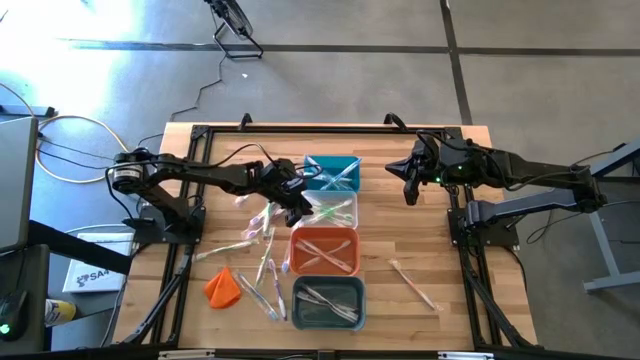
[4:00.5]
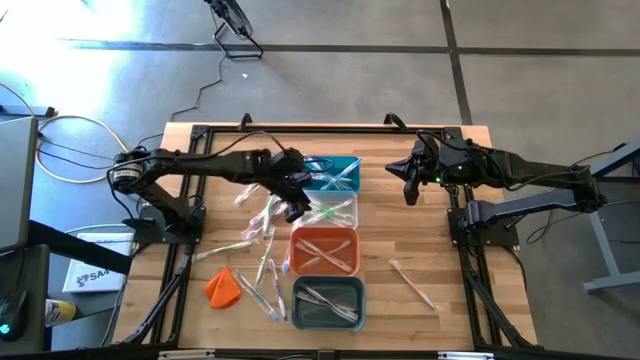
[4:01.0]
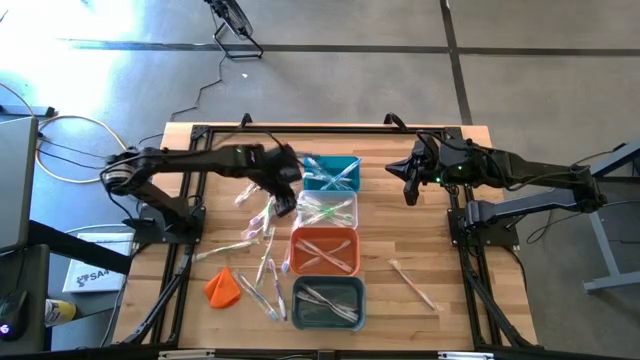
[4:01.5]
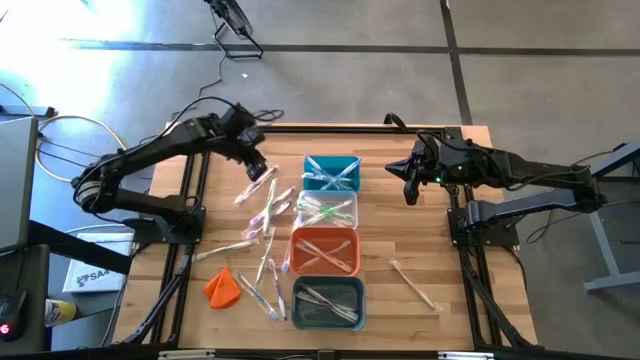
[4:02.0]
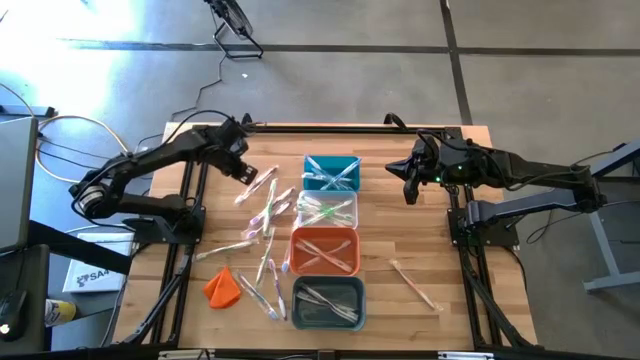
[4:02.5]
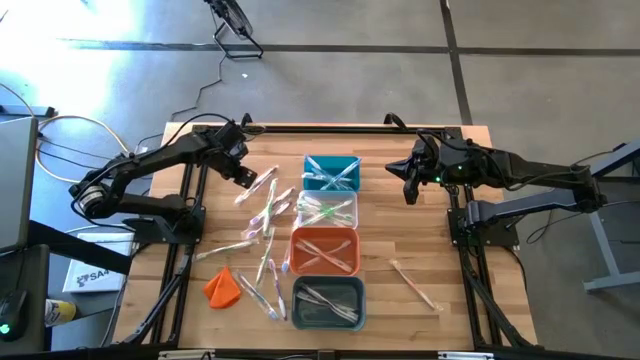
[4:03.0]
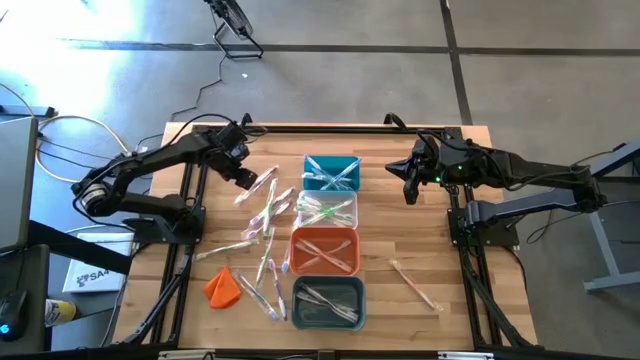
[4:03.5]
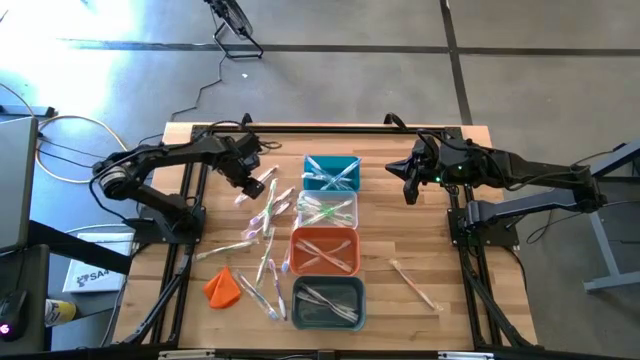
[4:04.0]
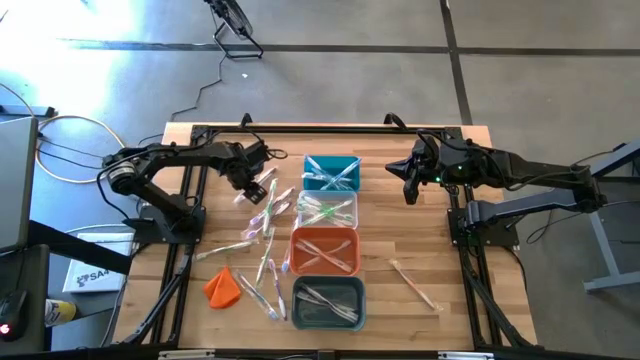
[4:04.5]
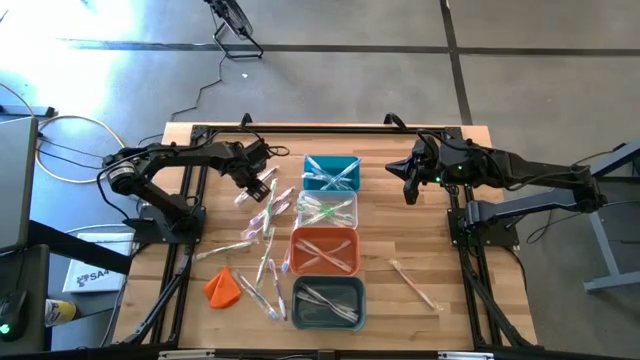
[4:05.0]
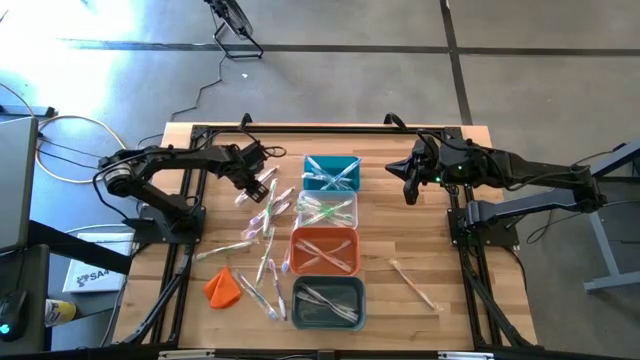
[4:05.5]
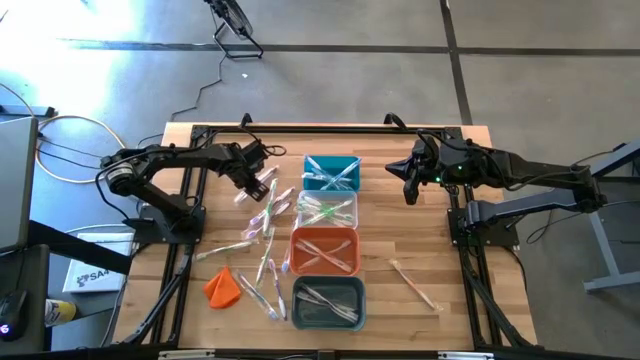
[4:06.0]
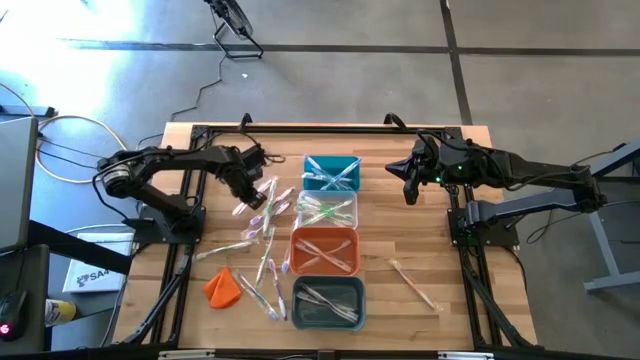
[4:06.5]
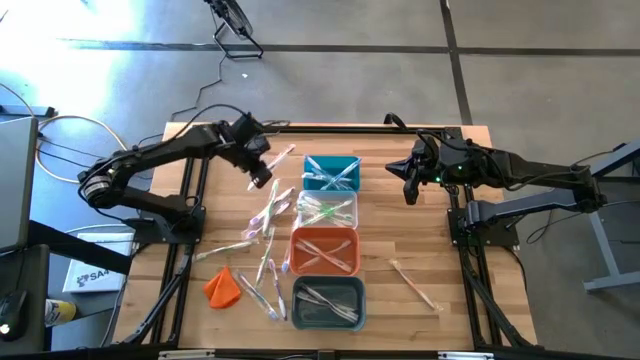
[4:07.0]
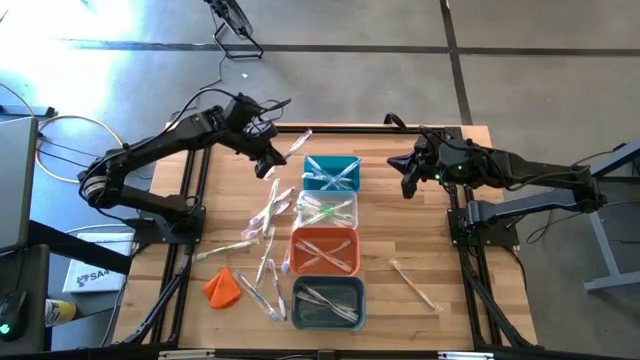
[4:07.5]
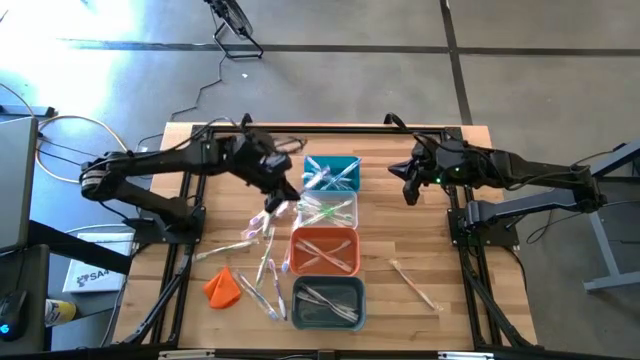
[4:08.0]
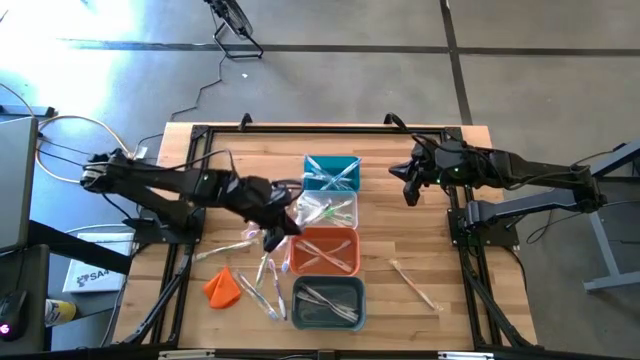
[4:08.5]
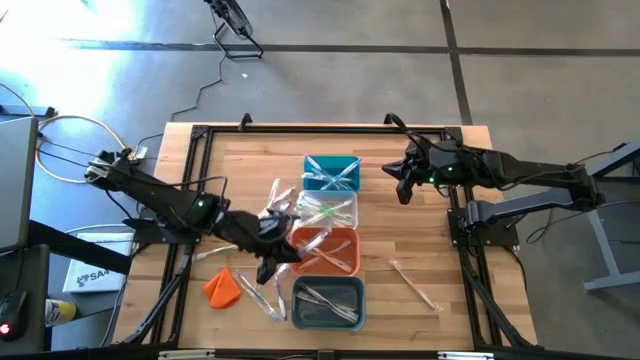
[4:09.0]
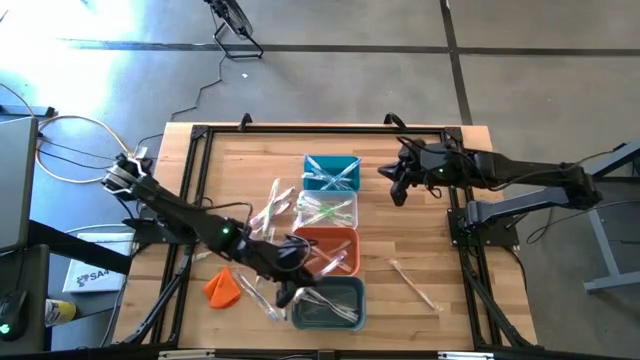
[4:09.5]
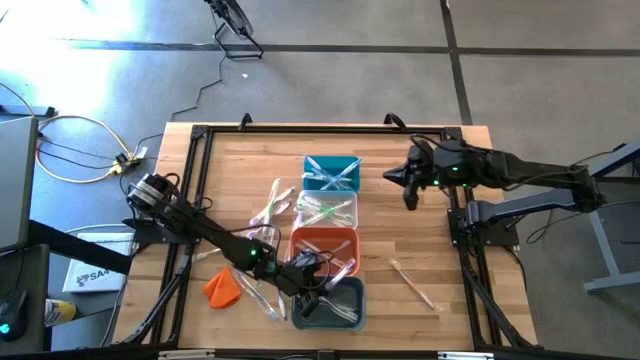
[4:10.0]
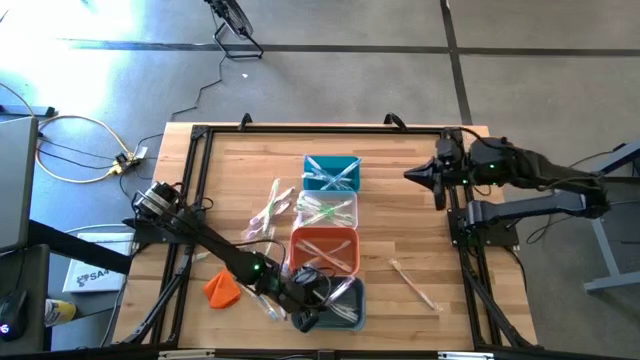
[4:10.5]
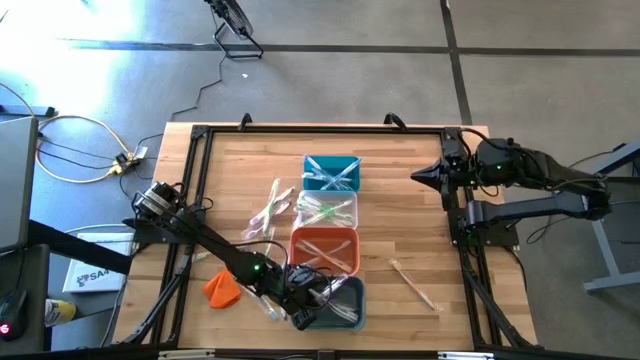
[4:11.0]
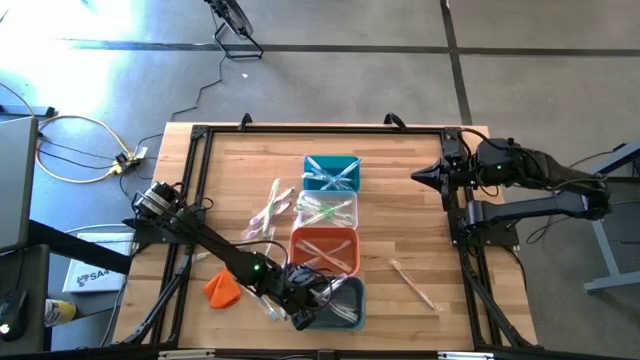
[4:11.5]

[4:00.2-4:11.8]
Task: Pick & Place Toothbrushes
Put the violet toothbrush into the green bin

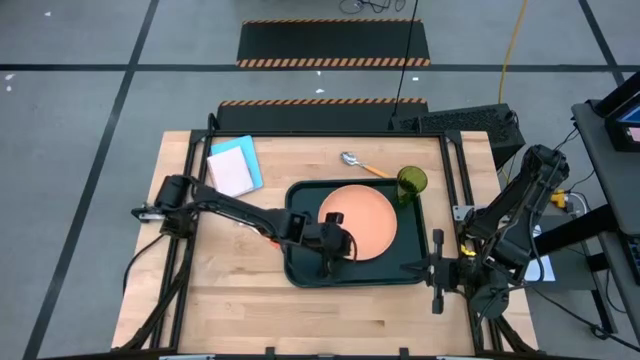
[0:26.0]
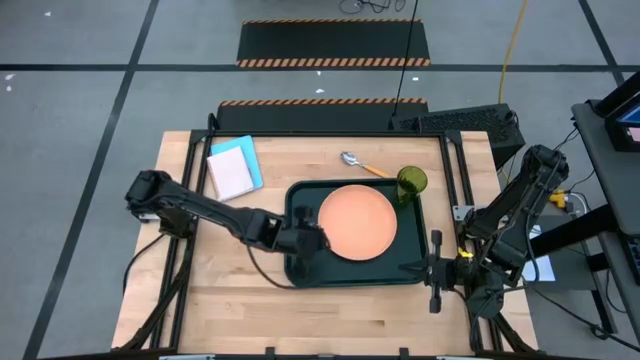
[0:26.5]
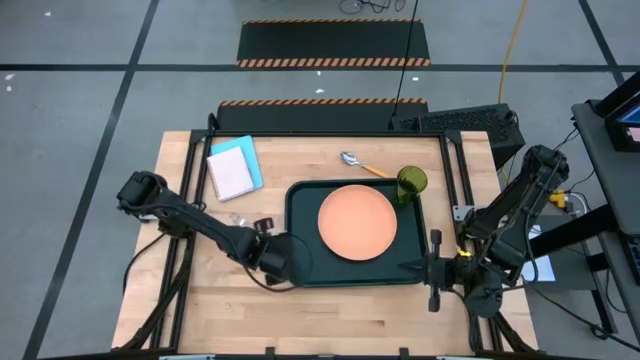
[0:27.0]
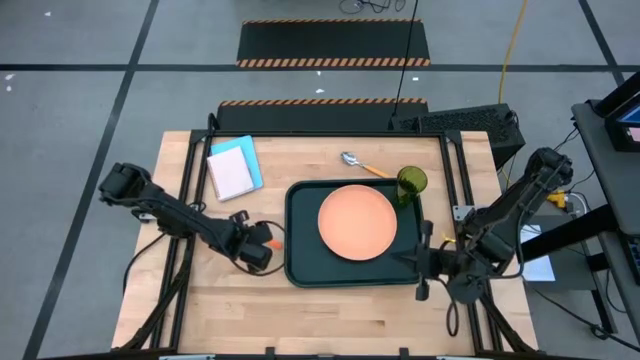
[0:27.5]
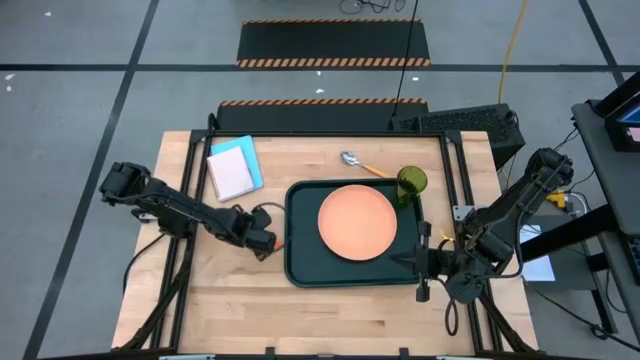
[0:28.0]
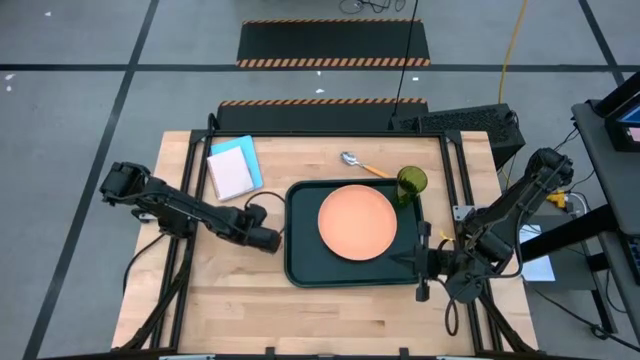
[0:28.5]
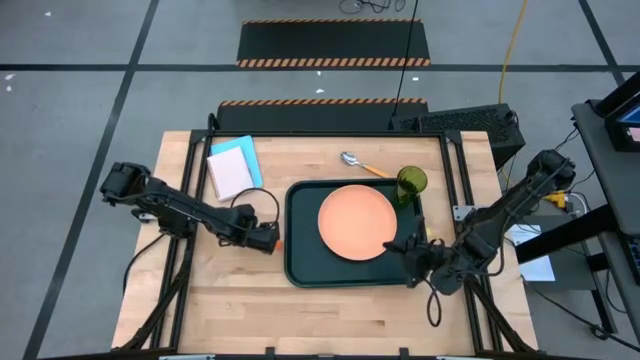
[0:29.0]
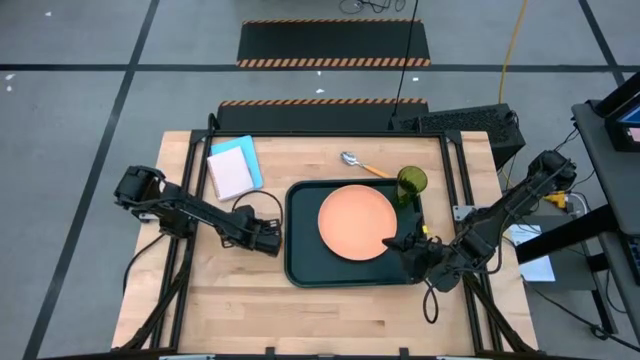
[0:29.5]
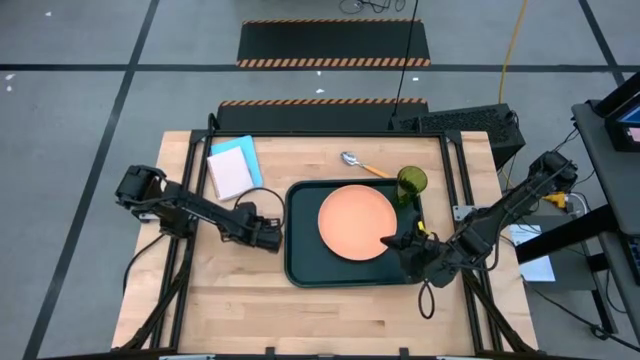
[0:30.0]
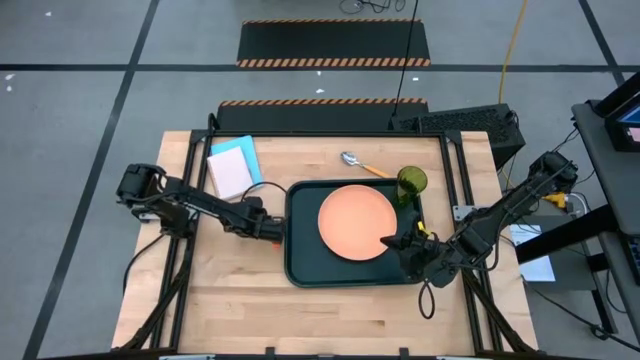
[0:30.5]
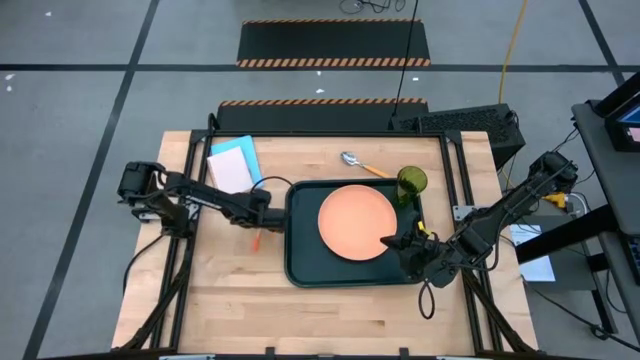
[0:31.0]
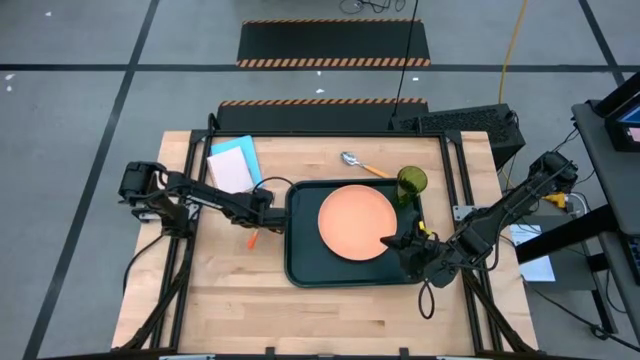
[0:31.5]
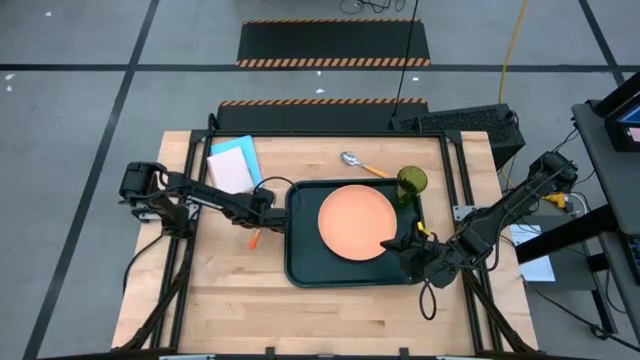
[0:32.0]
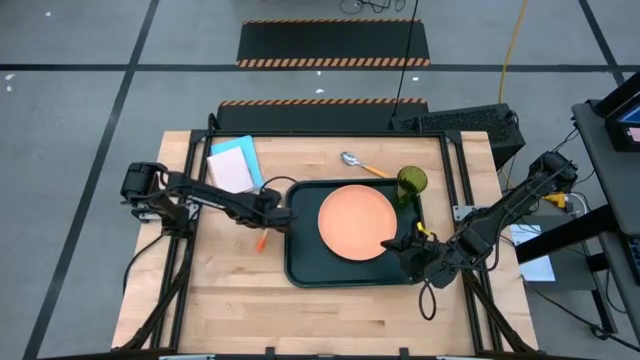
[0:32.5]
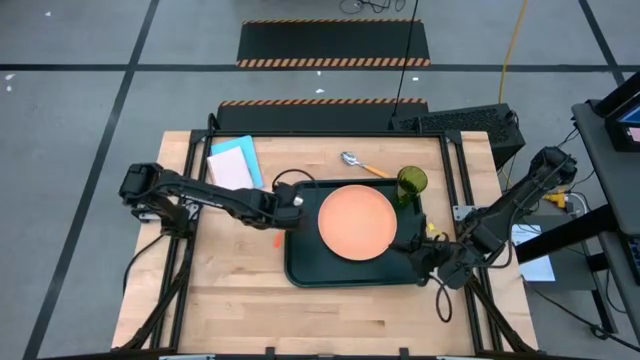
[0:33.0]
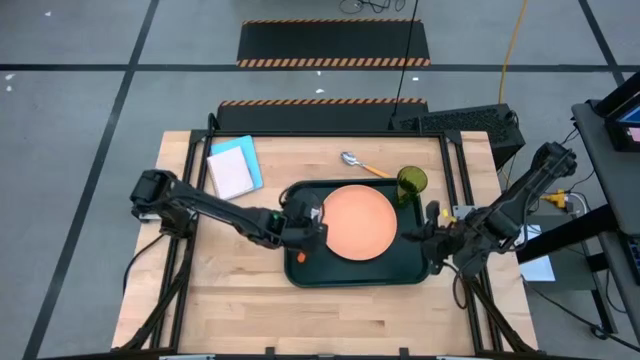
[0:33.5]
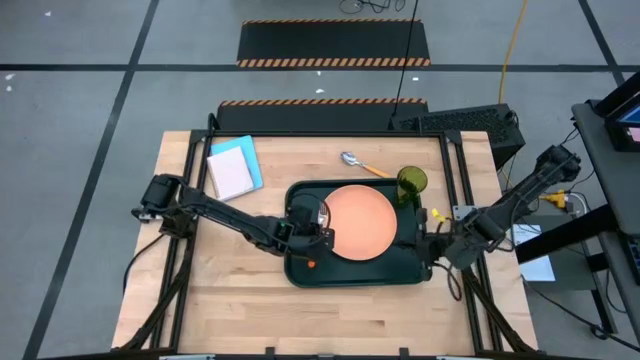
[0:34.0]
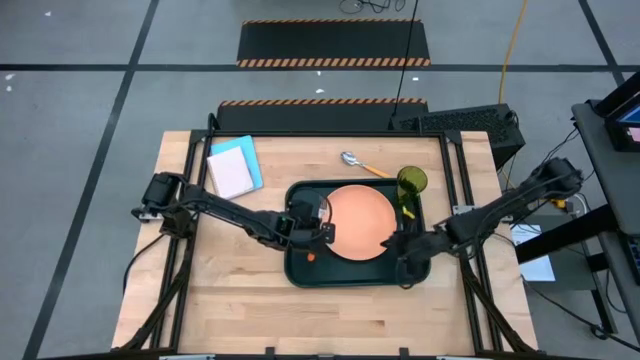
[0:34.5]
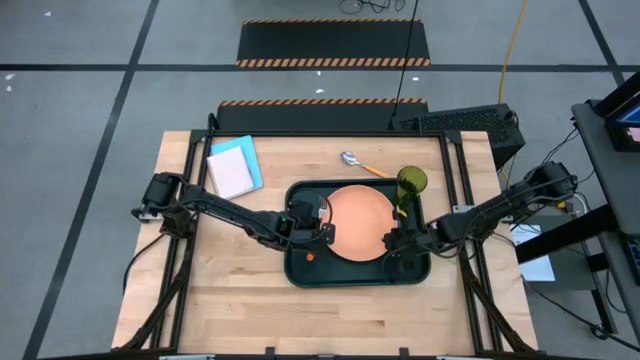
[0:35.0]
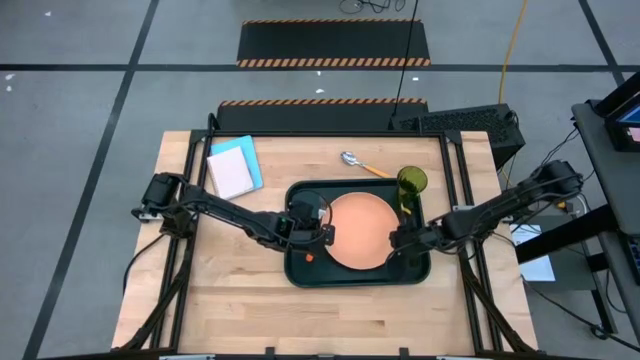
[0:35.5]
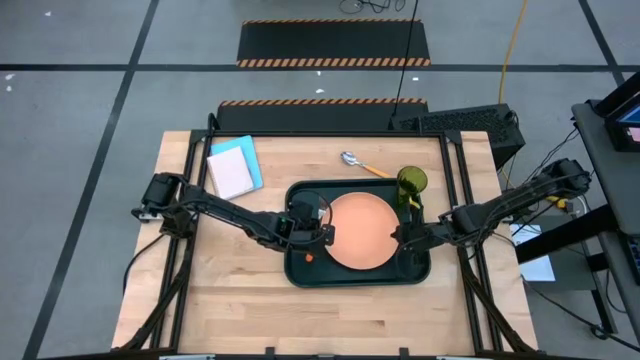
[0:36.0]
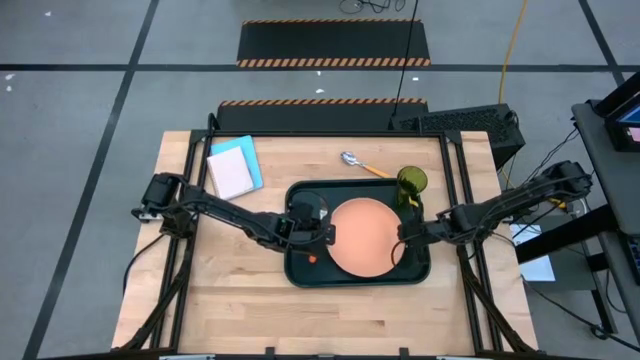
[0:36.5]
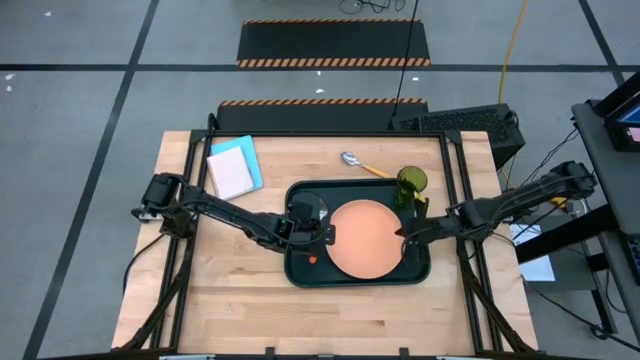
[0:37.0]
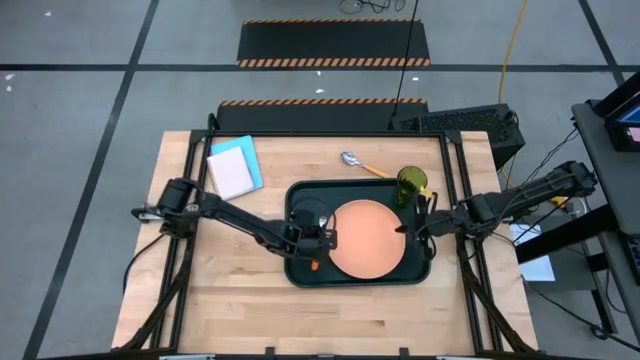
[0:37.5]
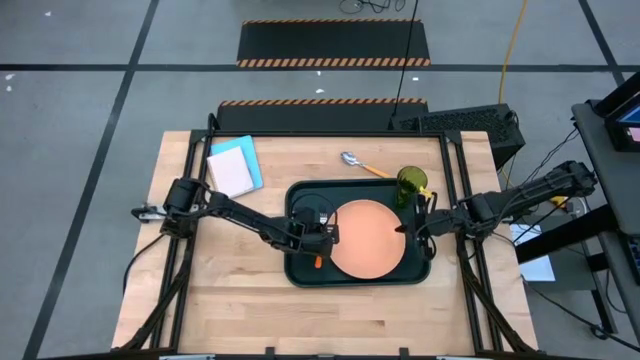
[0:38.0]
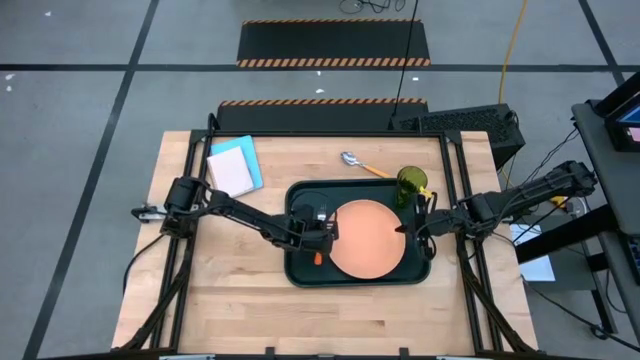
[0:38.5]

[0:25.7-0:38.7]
Task: Pick and place plate/cup/fork/spoon on tray
Put the orange fork on the green tray to the left of the orange plate
